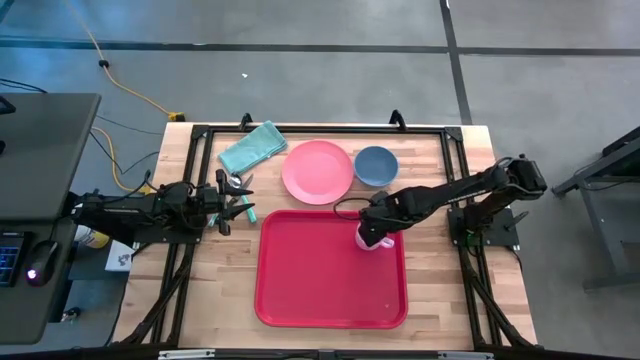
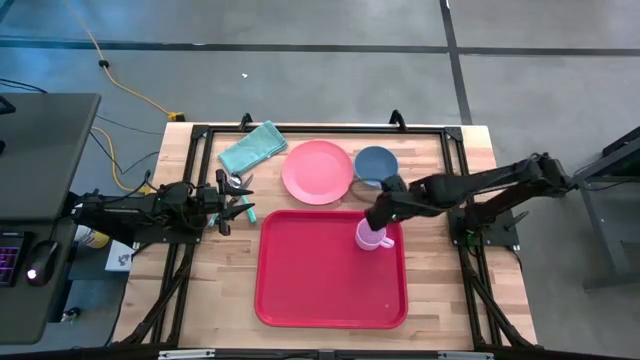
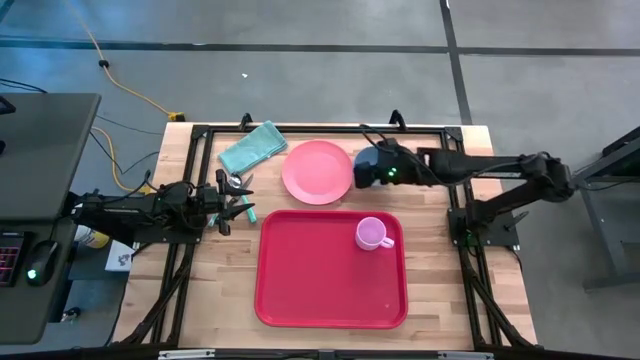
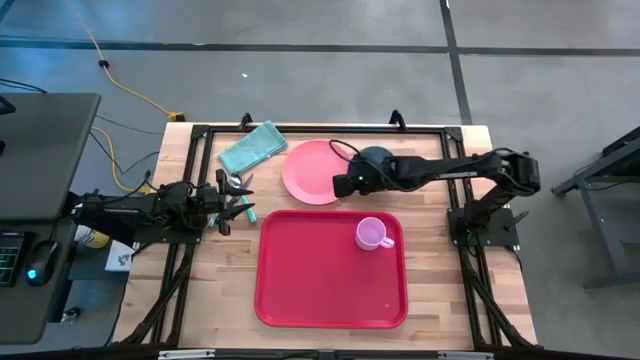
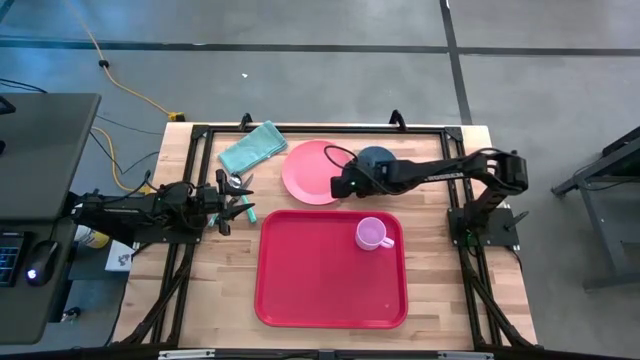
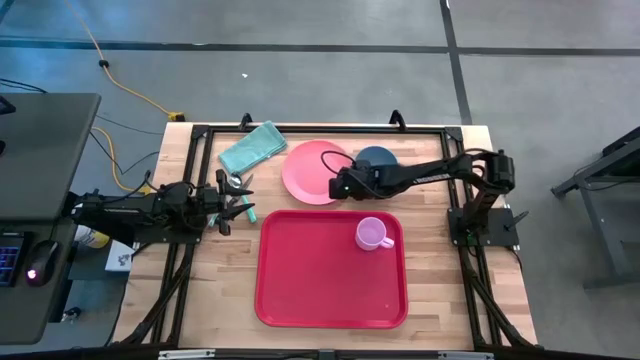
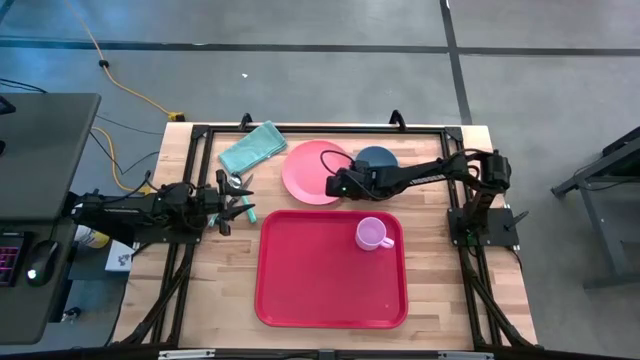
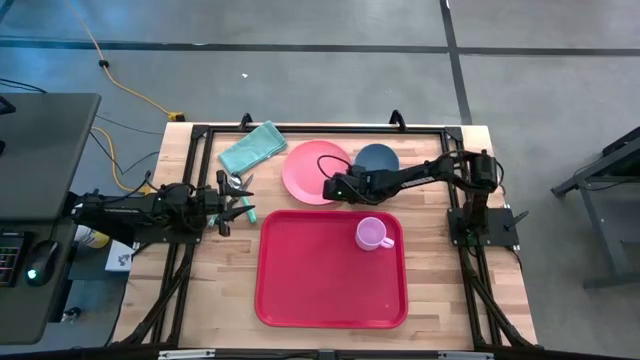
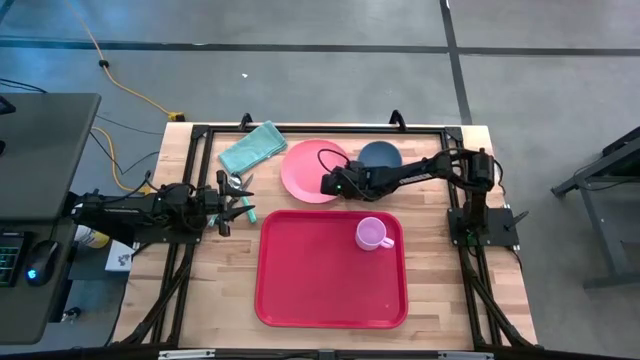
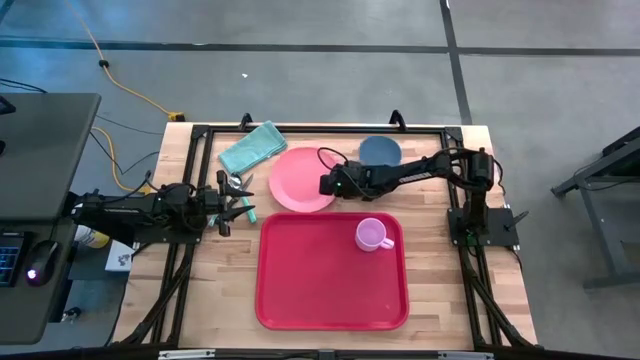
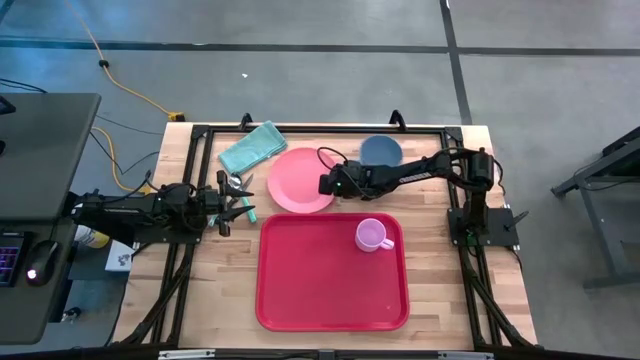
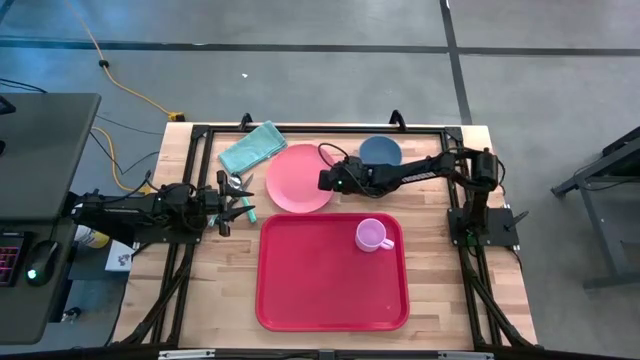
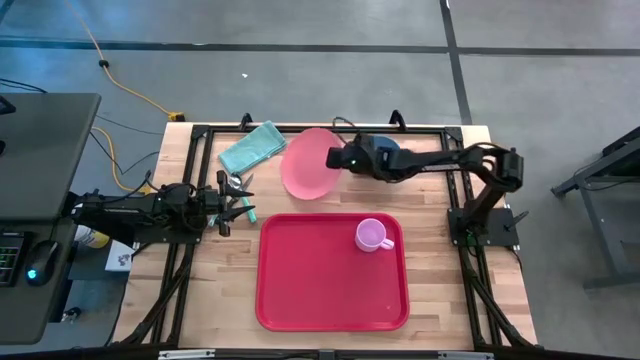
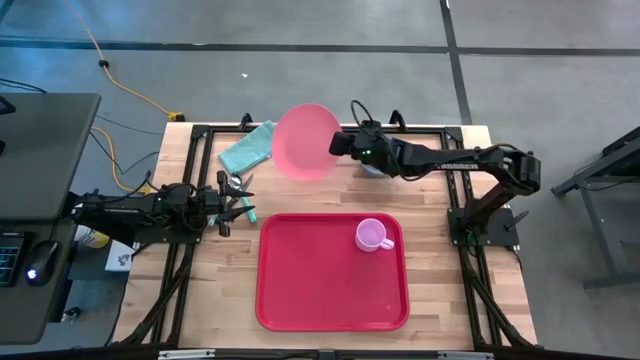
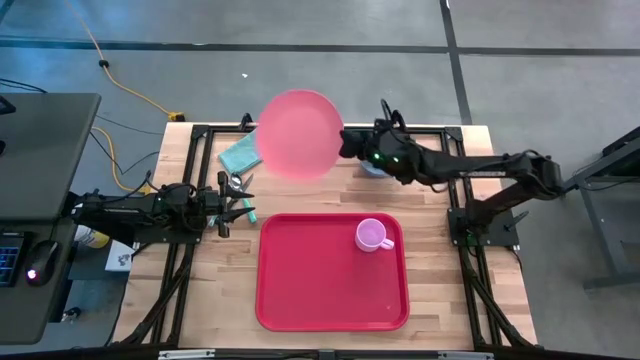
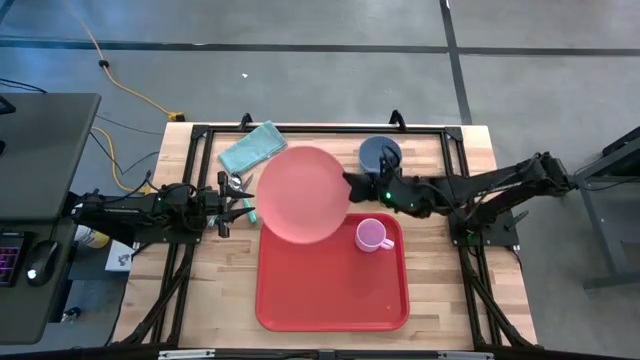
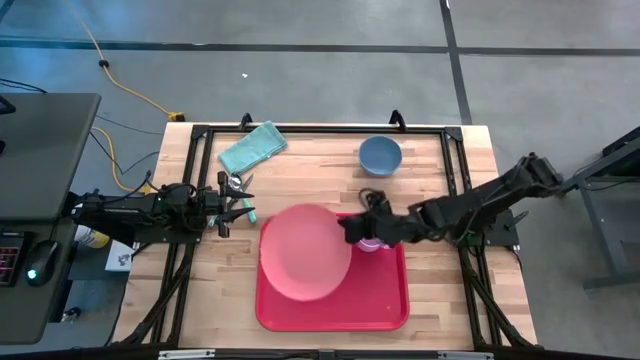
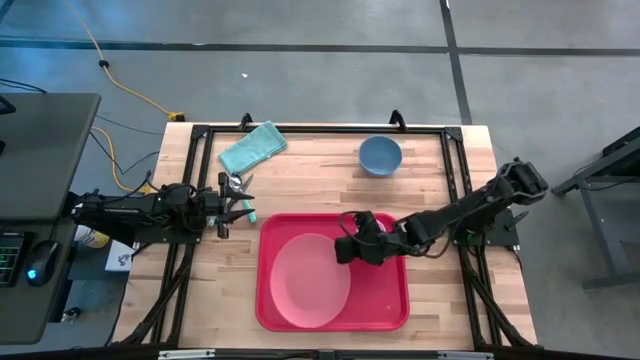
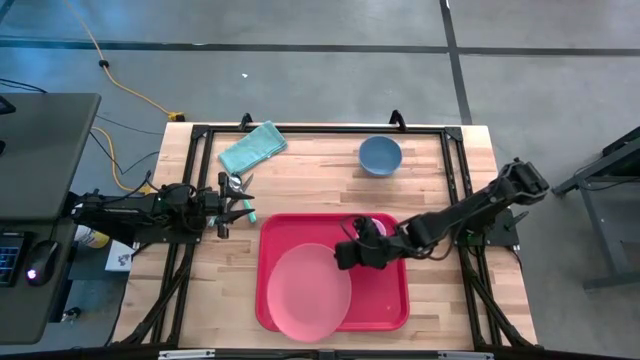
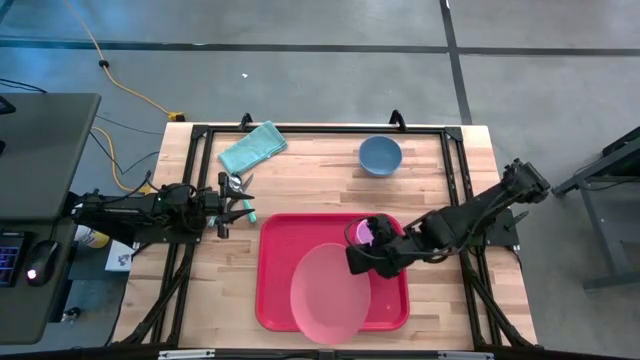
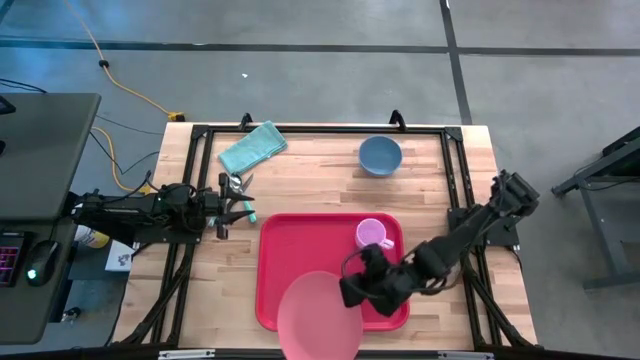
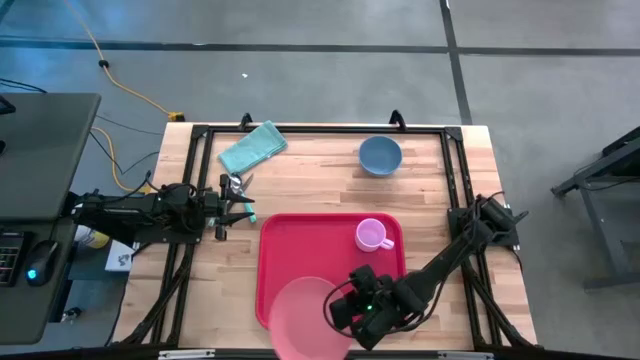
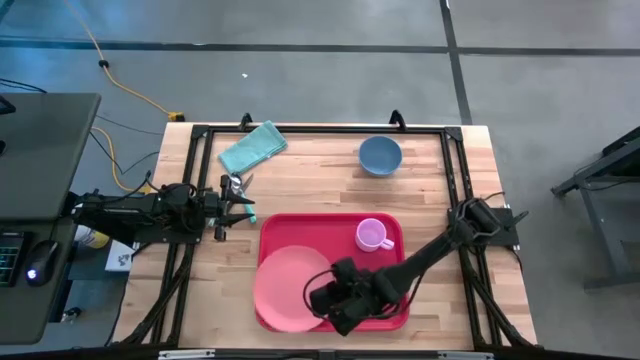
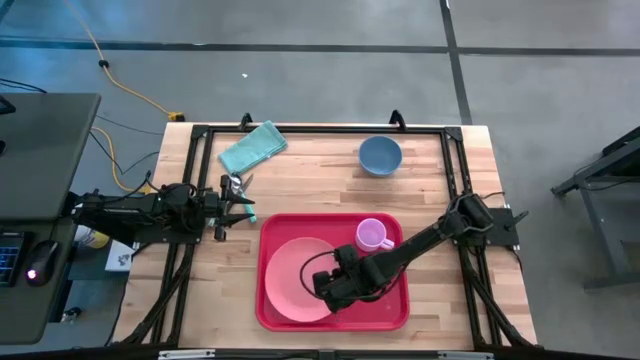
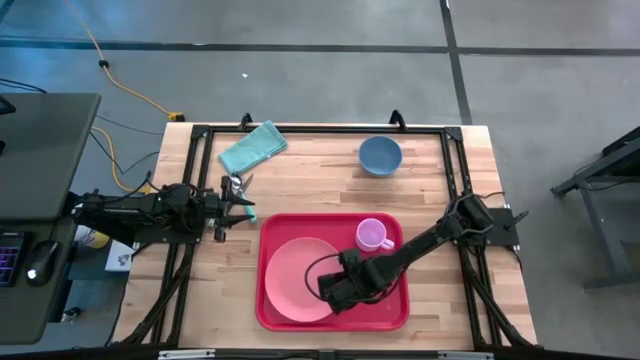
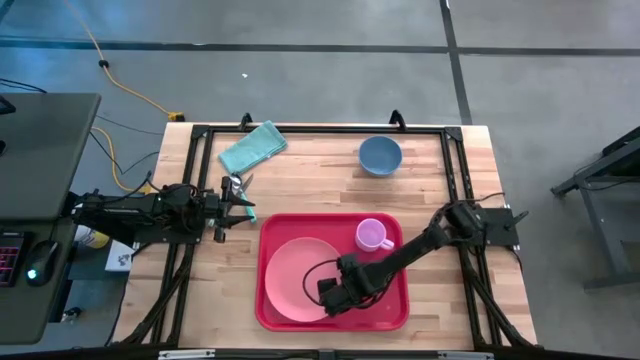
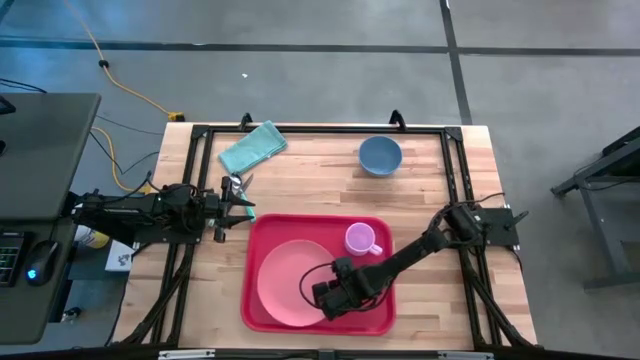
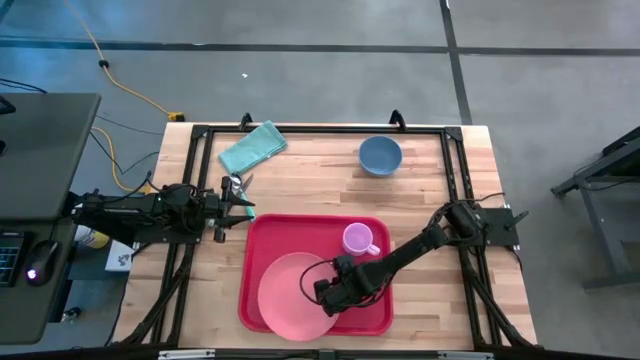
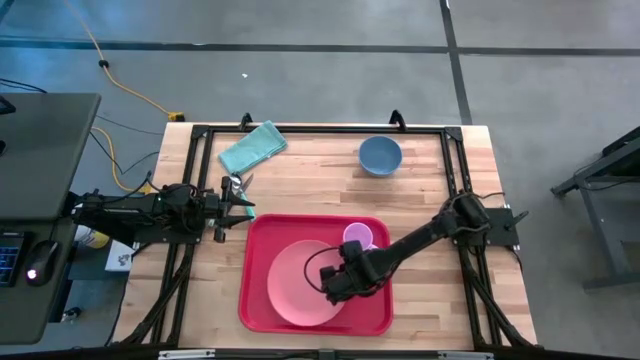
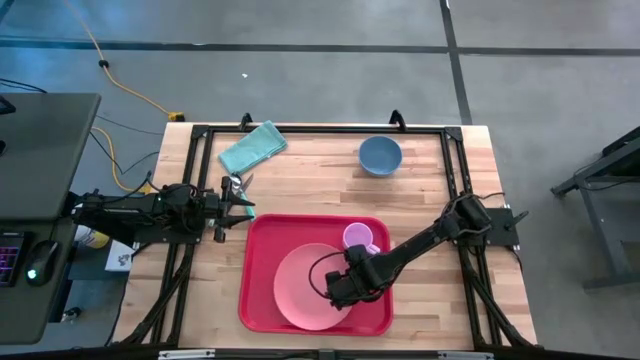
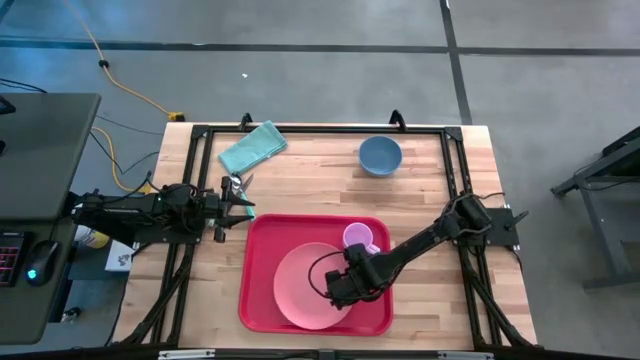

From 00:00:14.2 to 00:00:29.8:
Task: Set up tray
Put the pink plate on the center of the red serving tray

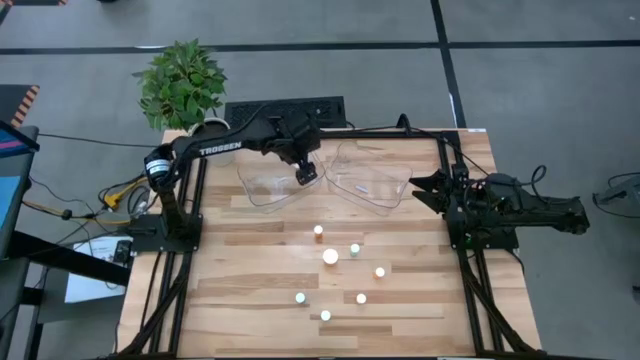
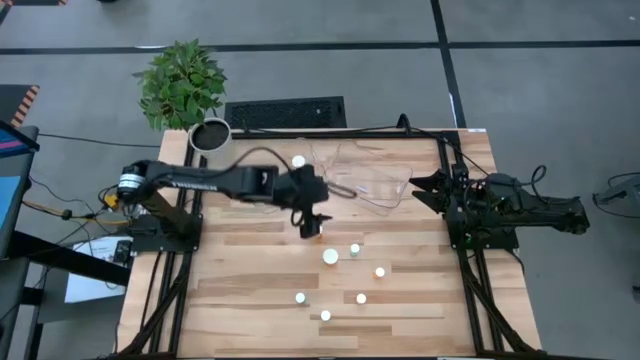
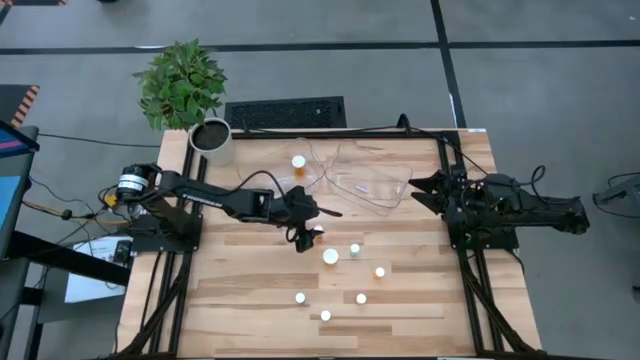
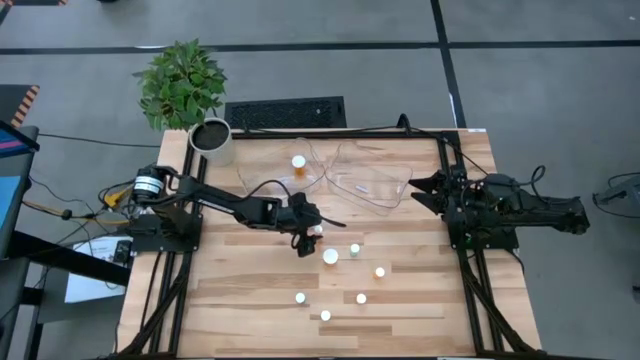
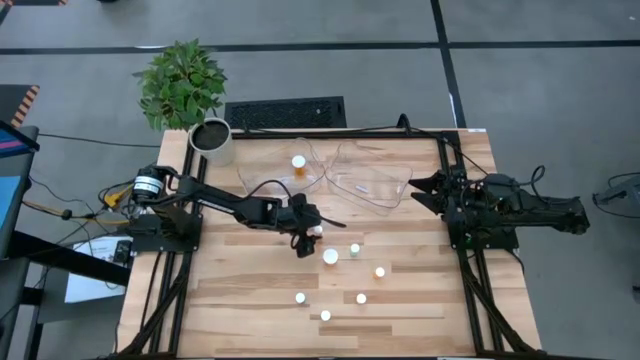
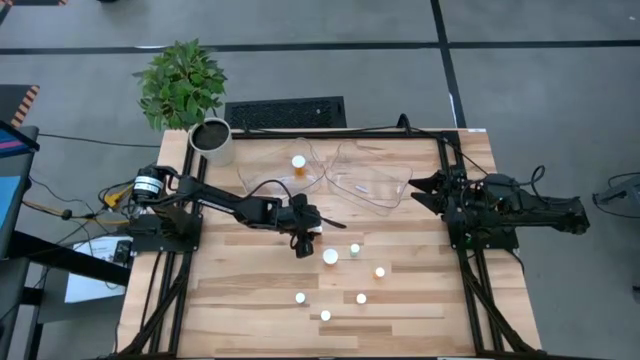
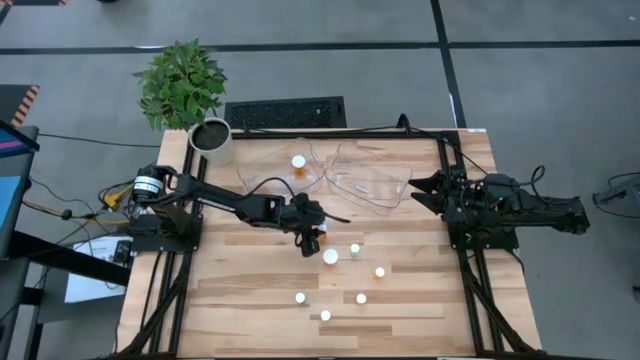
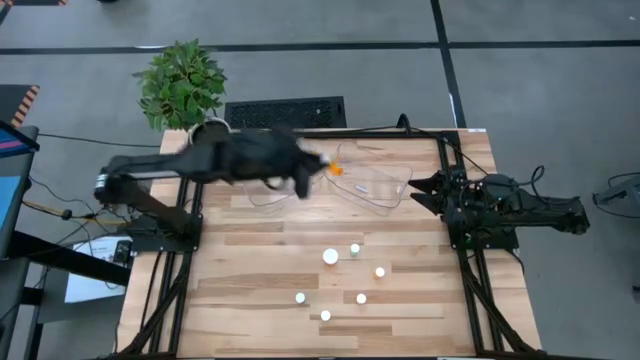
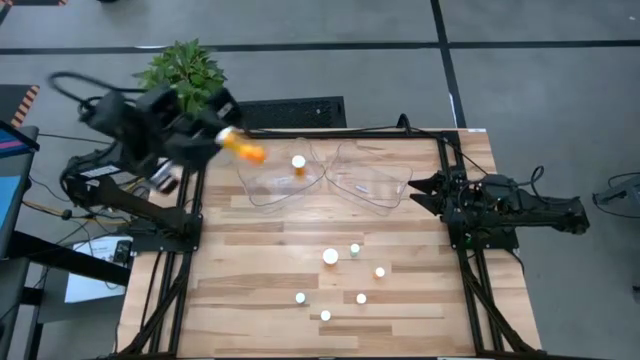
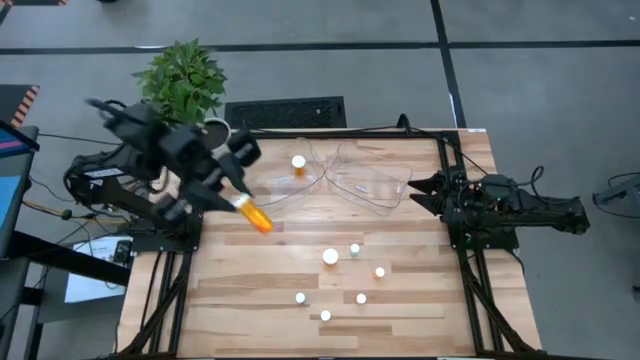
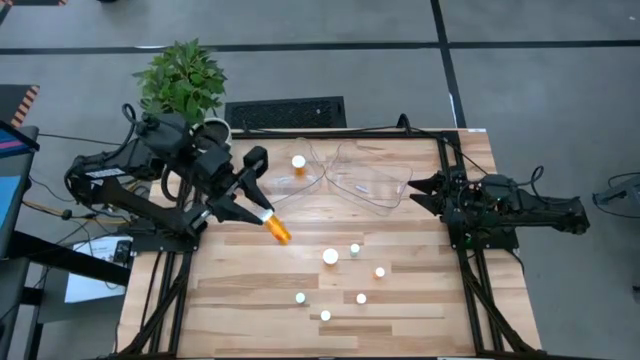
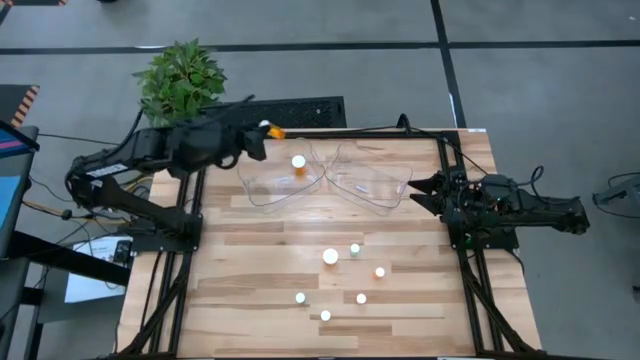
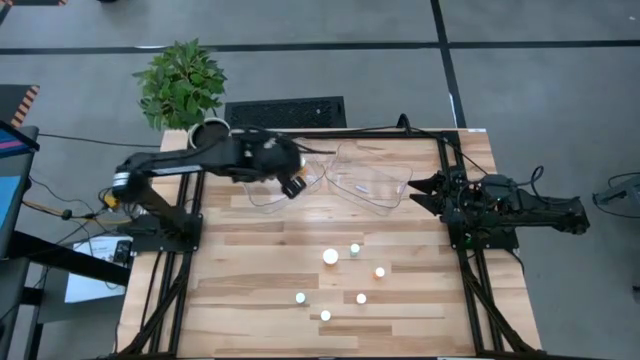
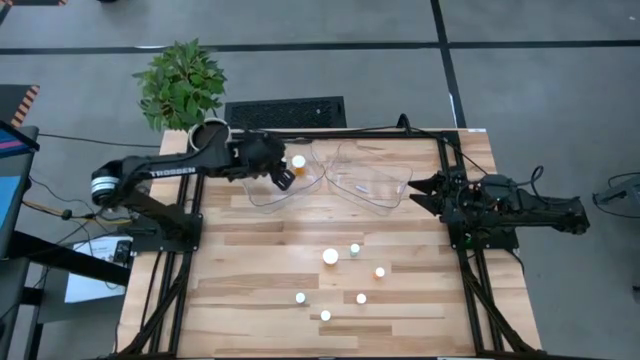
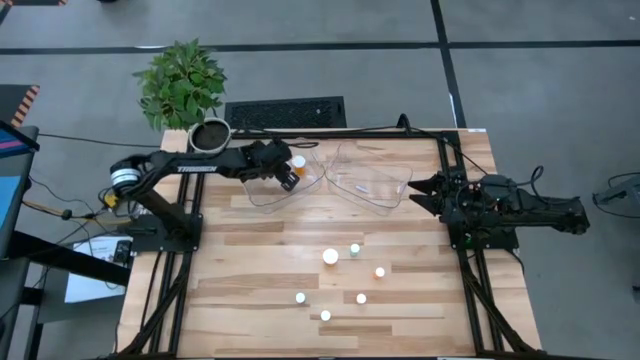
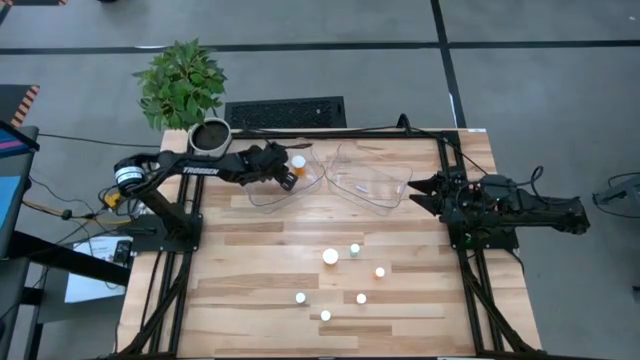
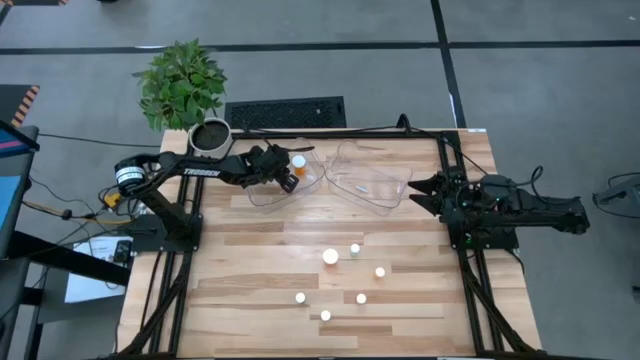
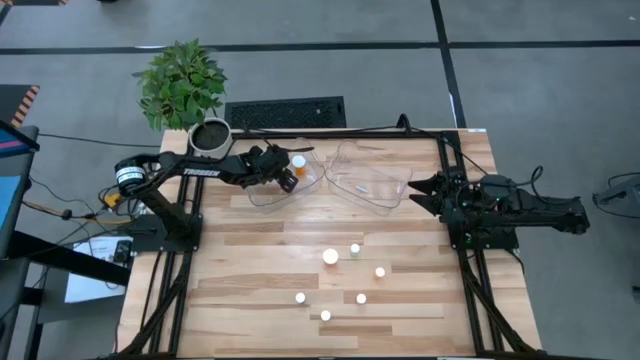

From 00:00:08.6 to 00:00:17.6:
Task: Pick and place medicine bottles into bin by pill shape (circle, oval)
Put the left small orange capsule bottle into the left transparent bin
